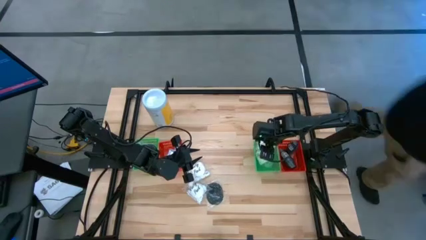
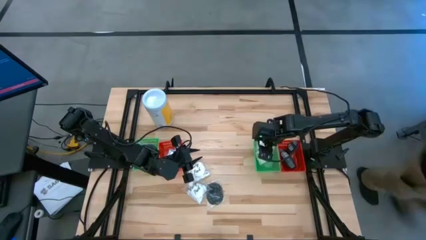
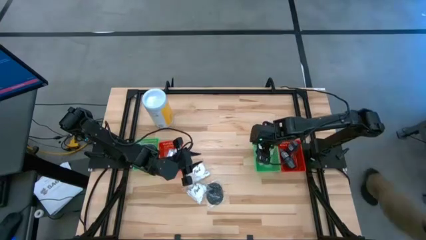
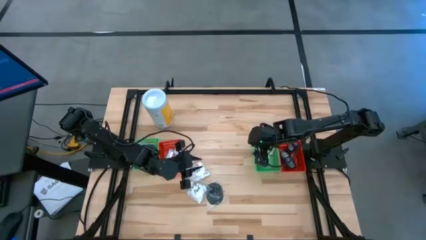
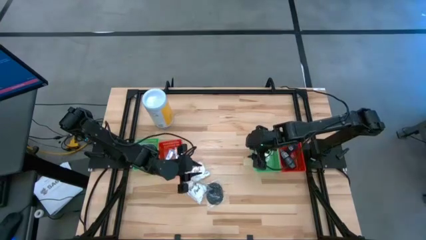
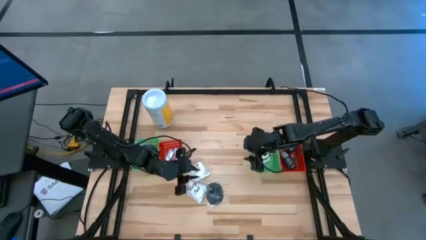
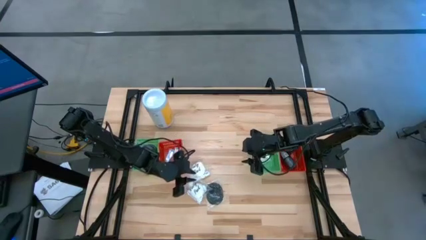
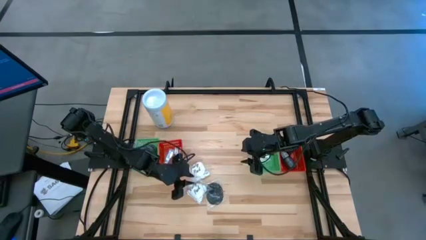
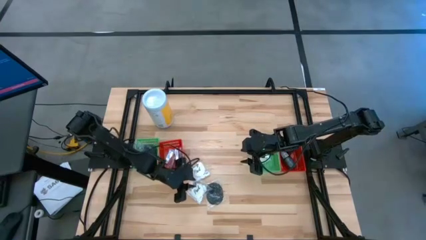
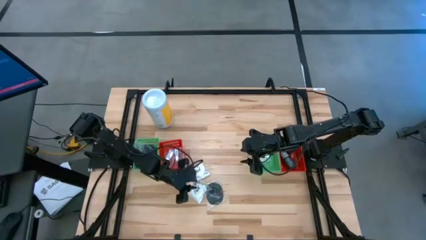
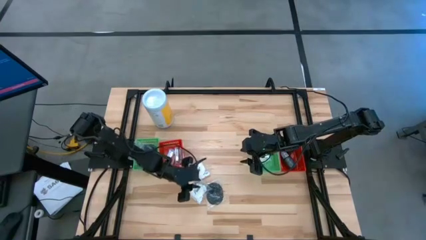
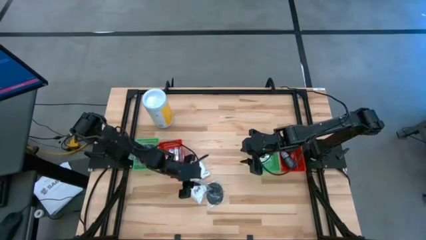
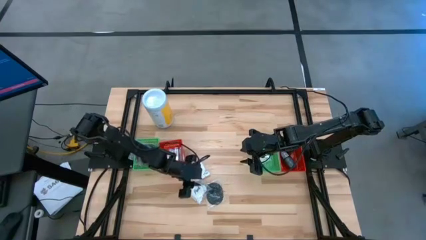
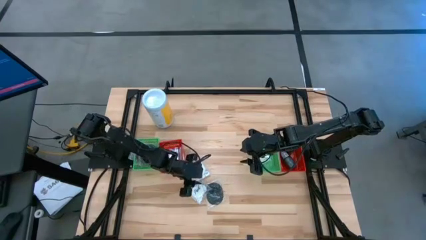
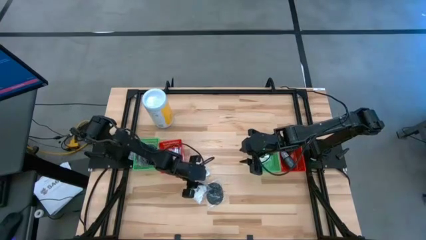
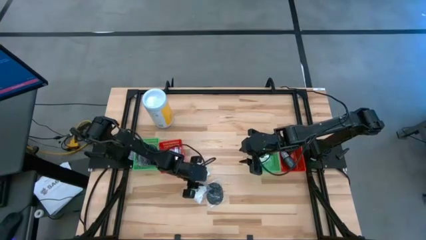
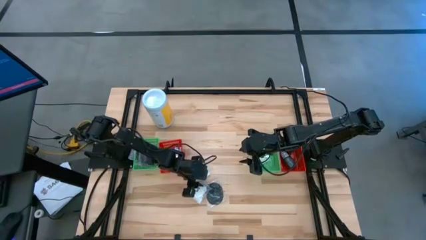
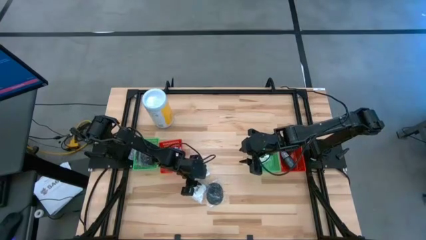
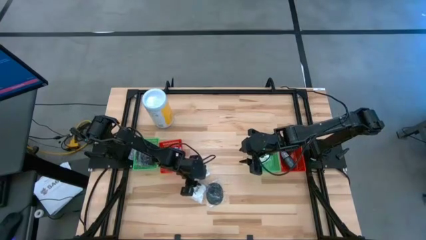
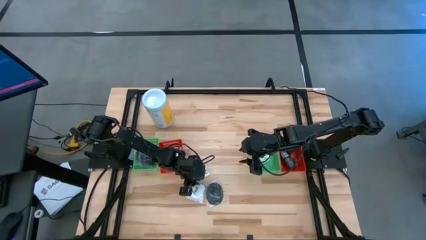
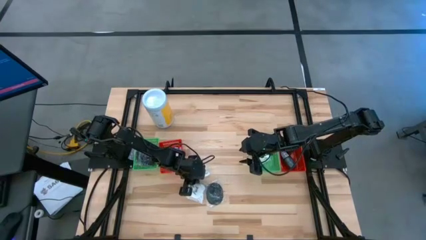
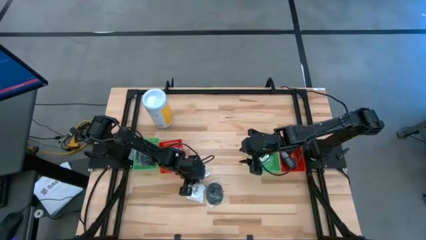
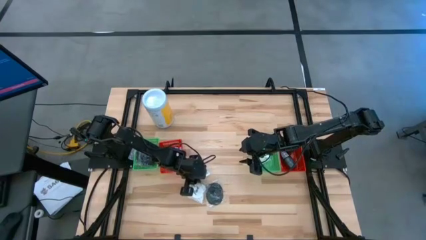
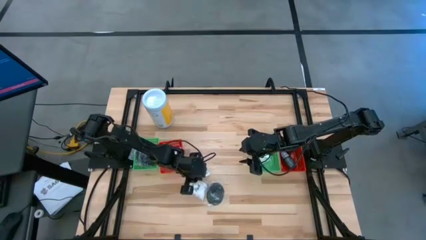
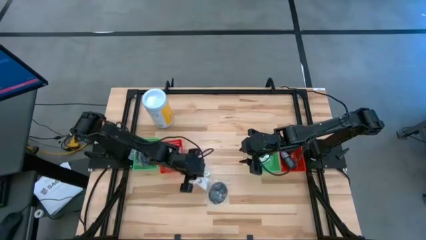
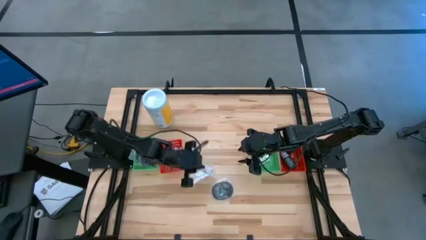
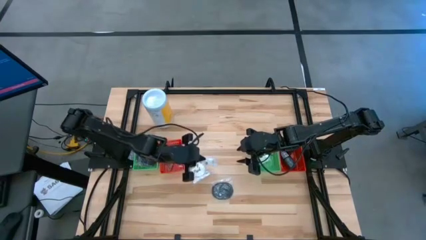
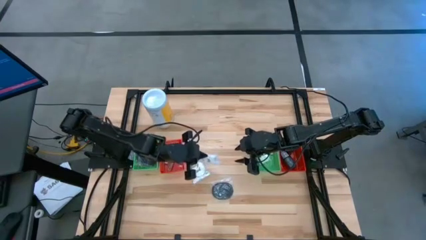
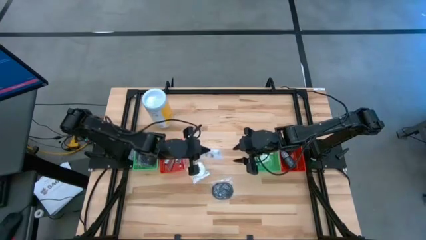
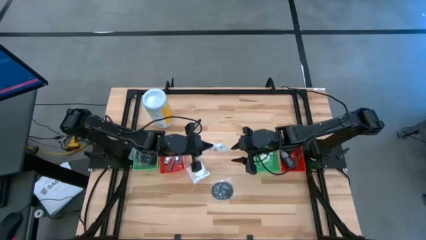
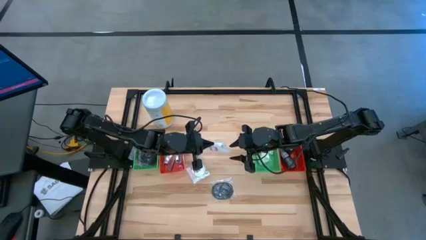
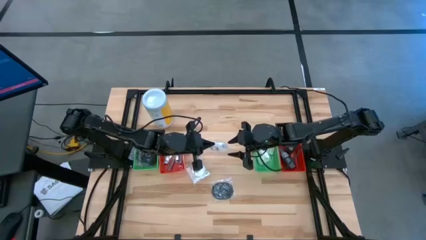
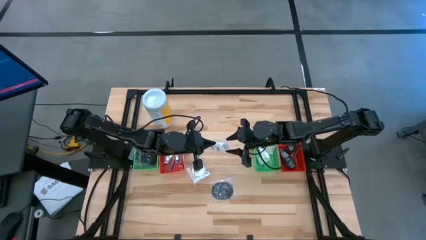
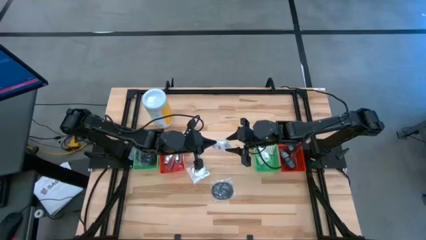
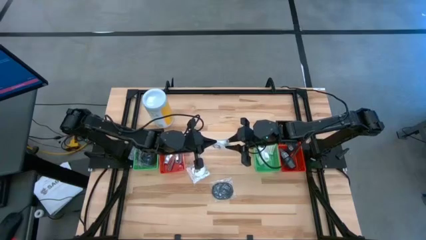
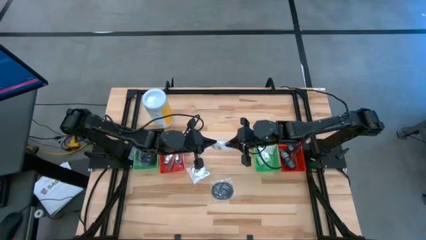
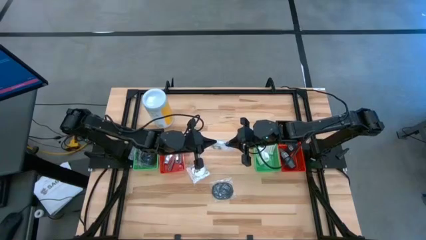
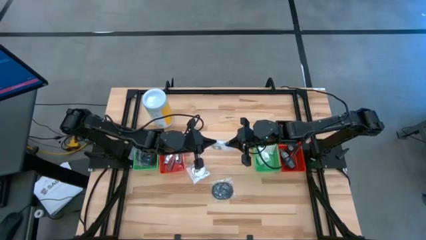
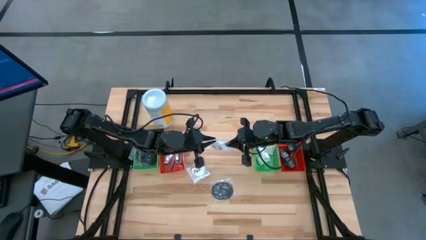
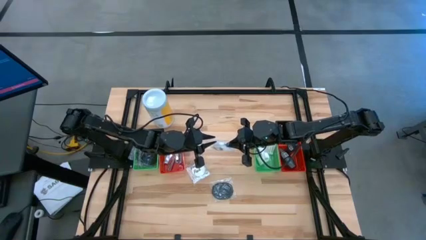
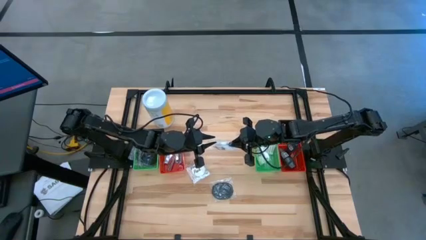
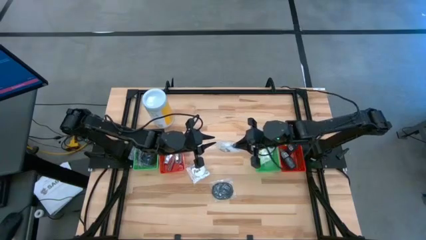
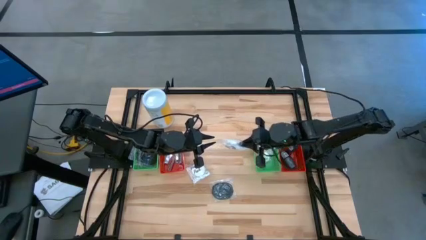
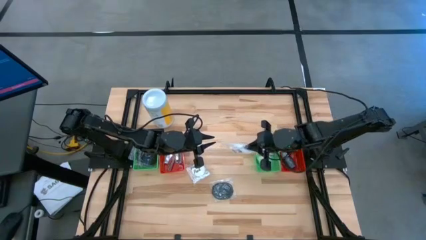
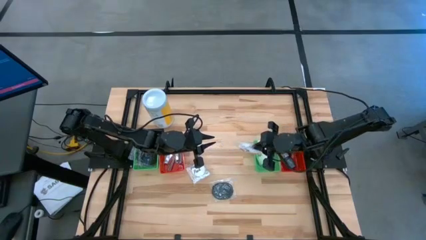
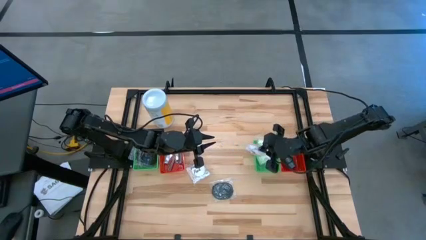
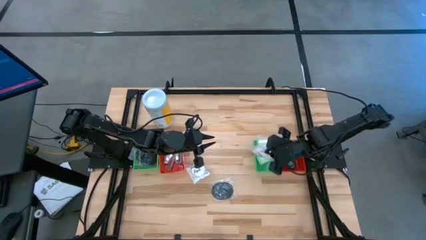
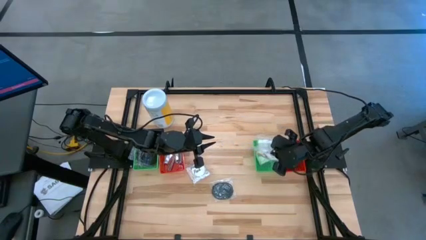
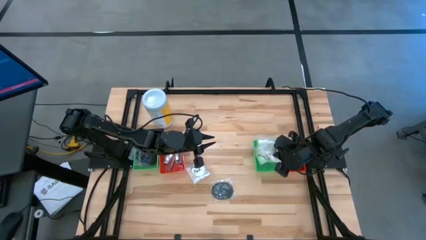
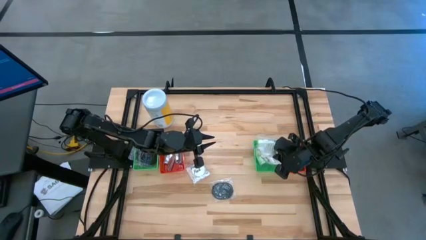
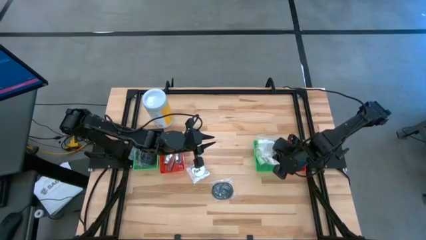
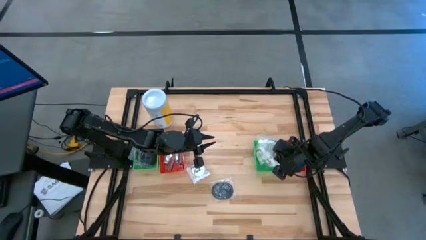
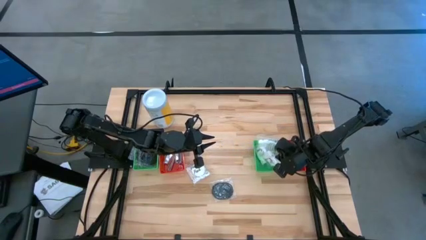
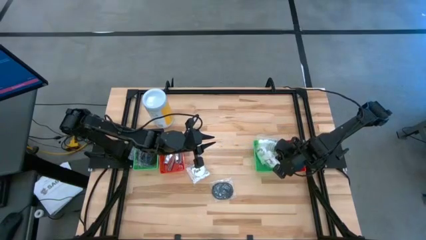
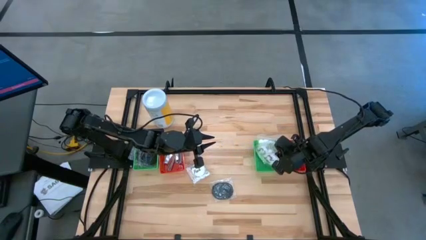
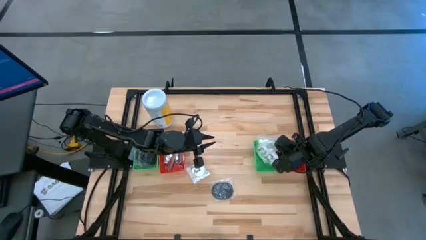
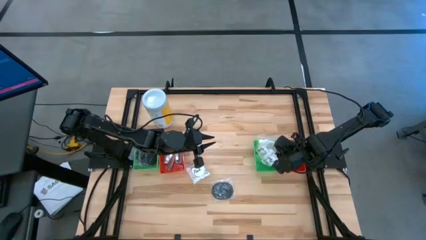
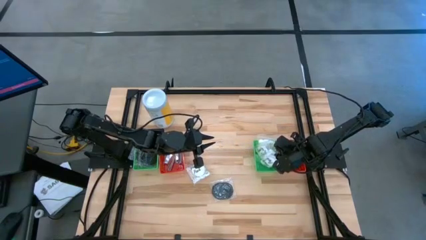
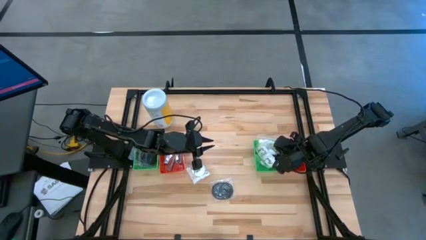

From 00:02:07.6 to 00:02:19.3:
Task: Pick & Place Travel size toiletries
Put the white cotton pack into the right green bin

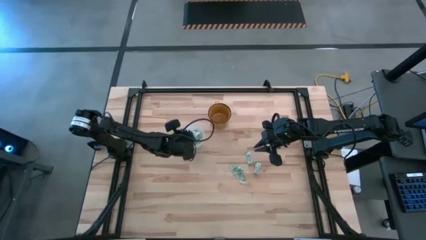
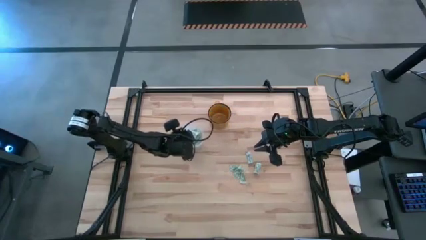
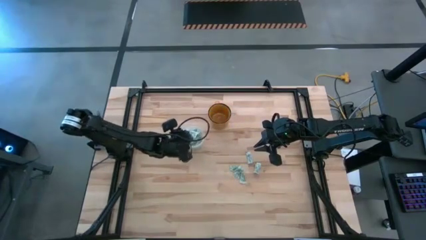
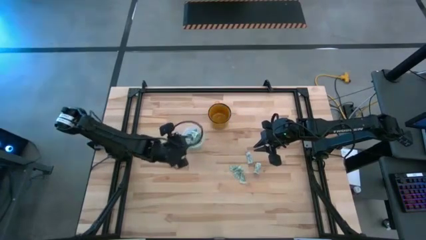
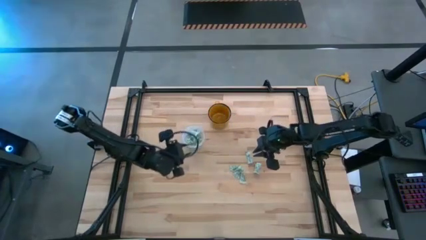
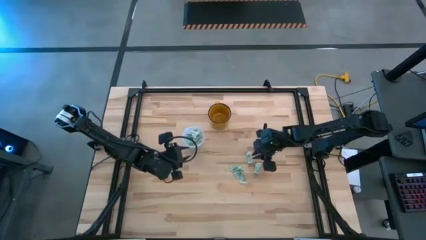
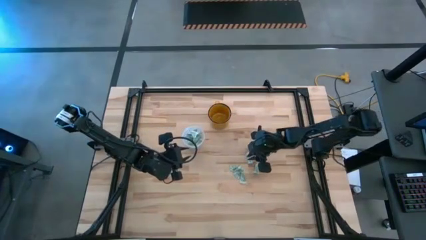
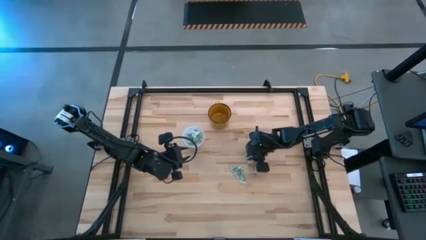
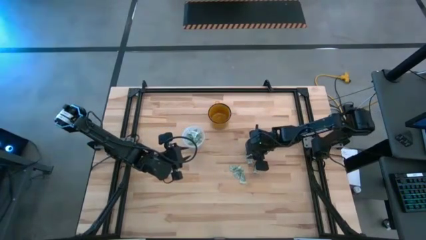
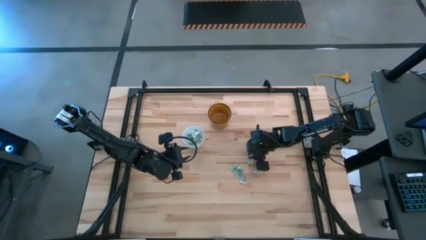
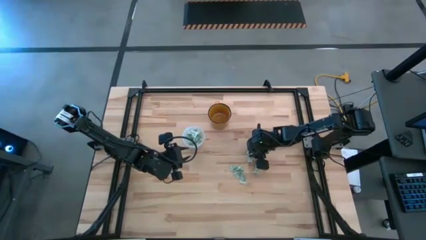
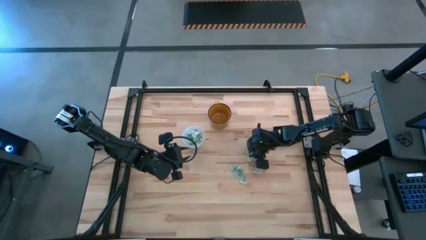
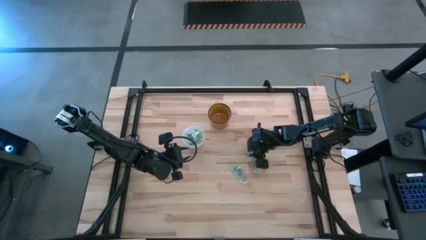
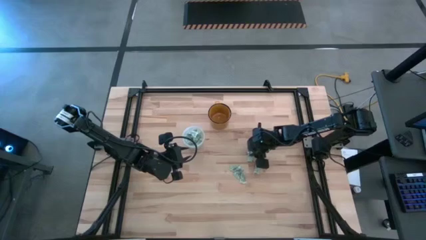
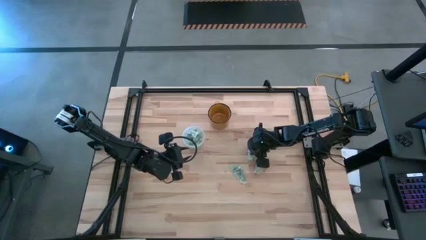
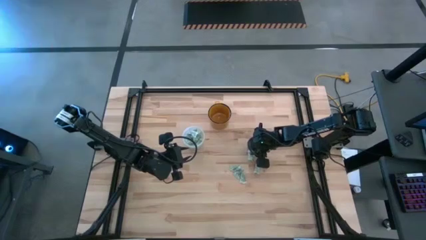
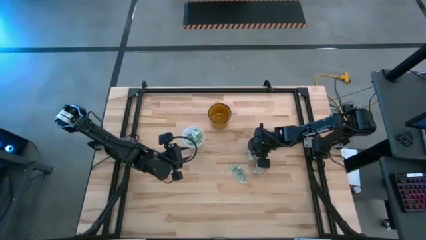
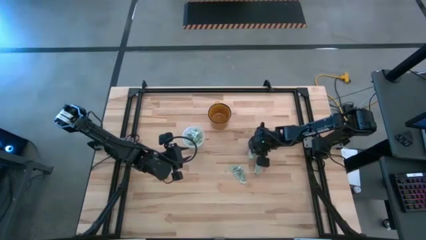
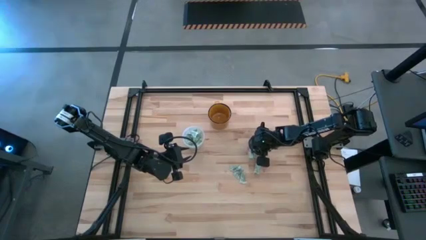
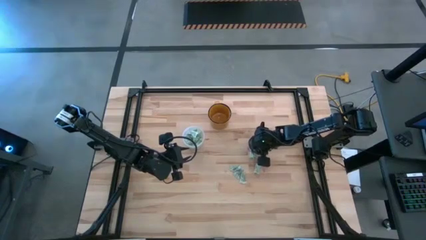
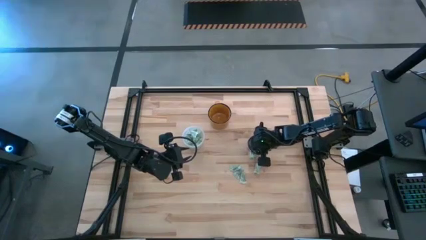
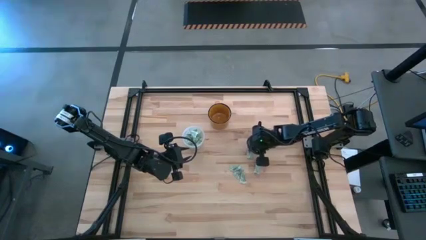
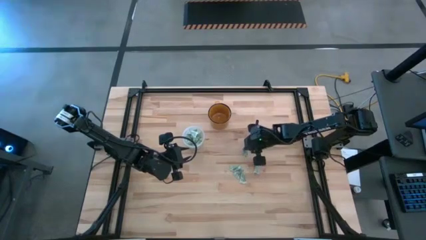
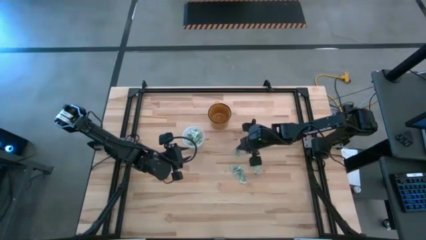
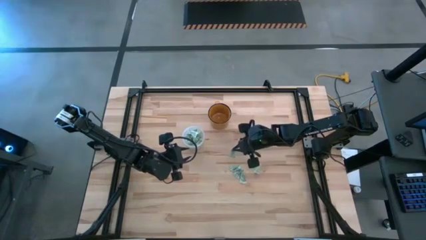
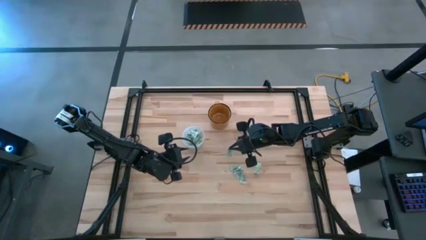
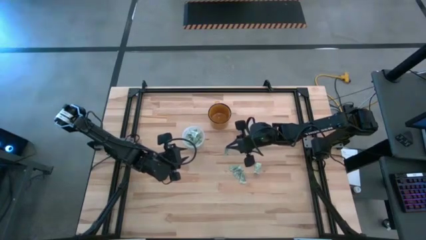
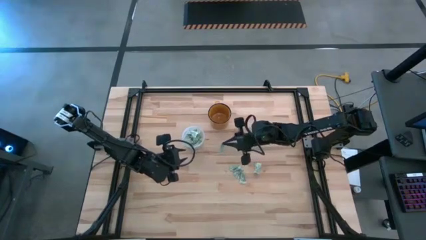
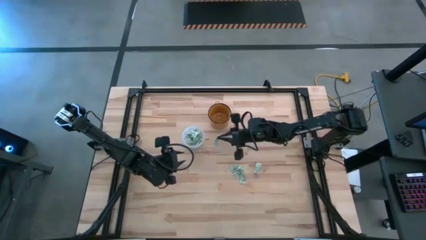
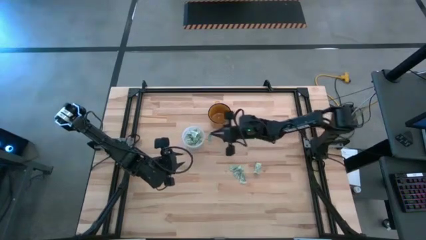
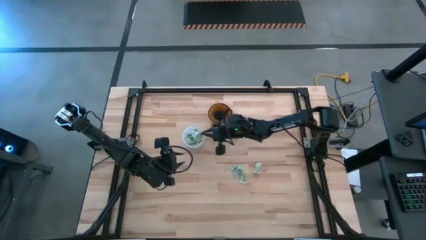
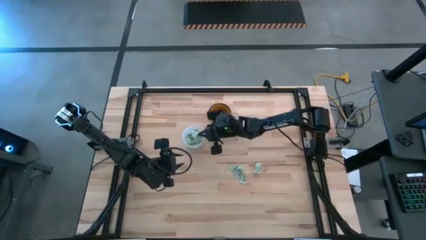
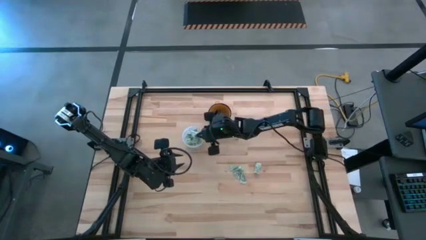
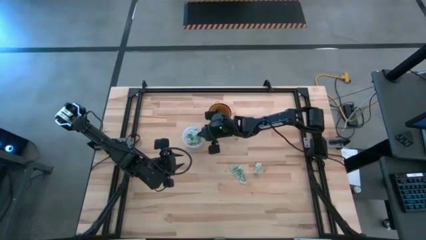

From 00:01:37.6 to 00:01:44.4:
Task: Pick and place Stevia / Truvia into bins
Put the stevia packet into the transparent bin
